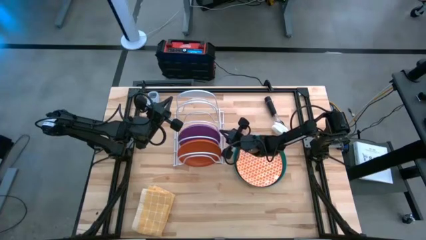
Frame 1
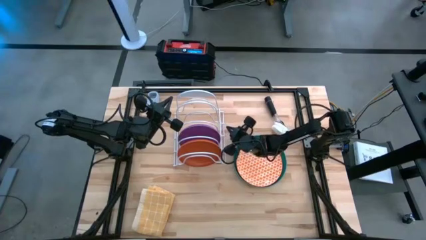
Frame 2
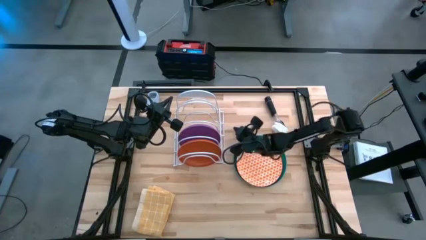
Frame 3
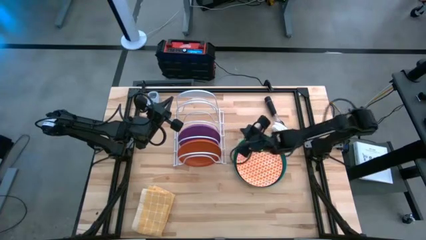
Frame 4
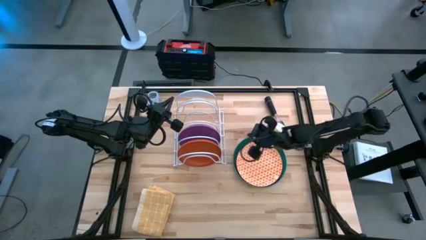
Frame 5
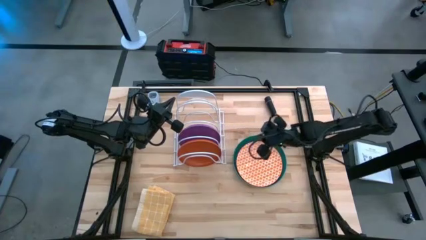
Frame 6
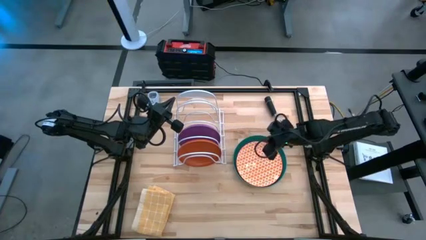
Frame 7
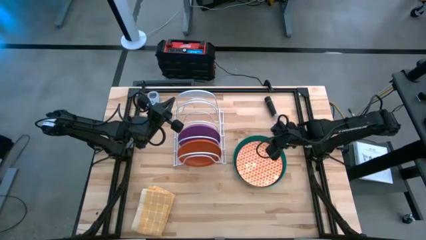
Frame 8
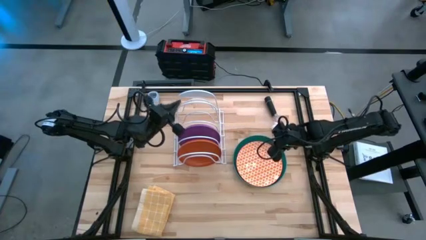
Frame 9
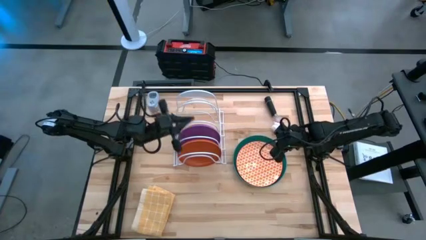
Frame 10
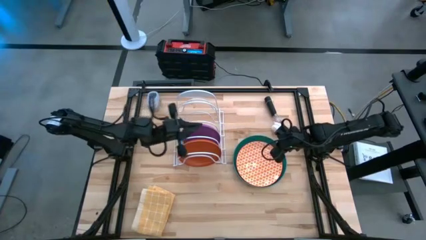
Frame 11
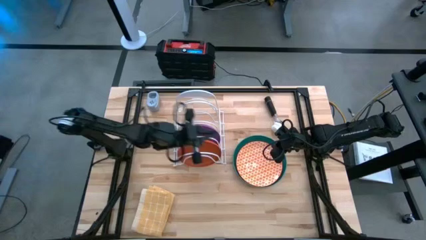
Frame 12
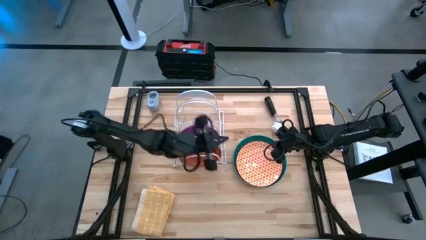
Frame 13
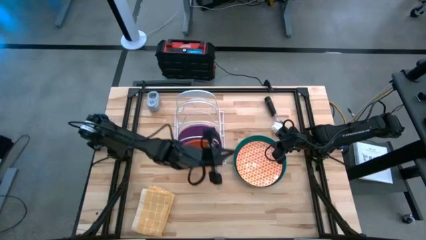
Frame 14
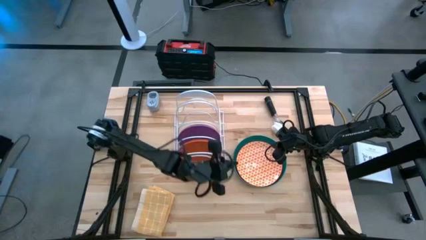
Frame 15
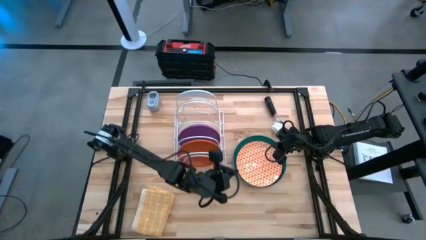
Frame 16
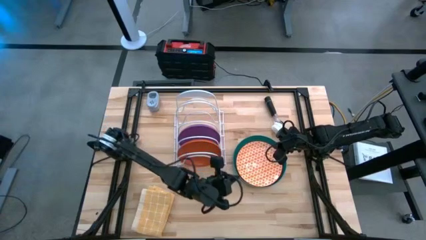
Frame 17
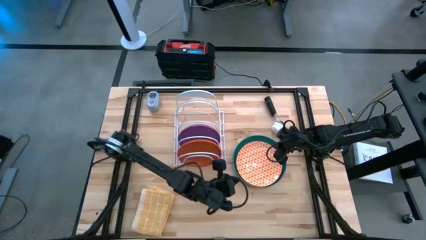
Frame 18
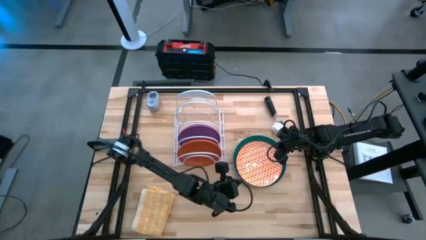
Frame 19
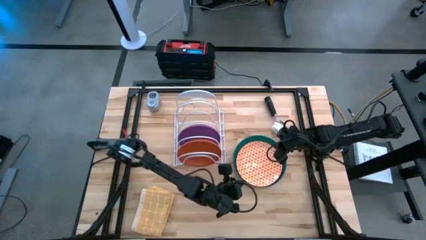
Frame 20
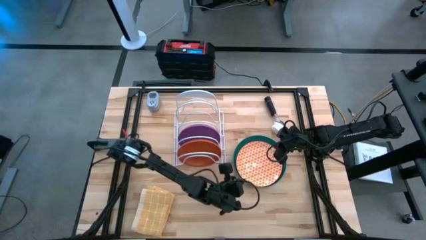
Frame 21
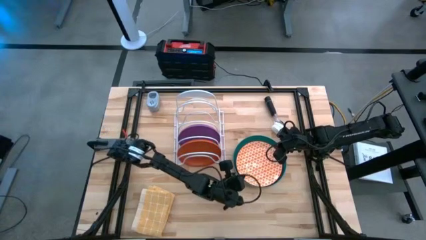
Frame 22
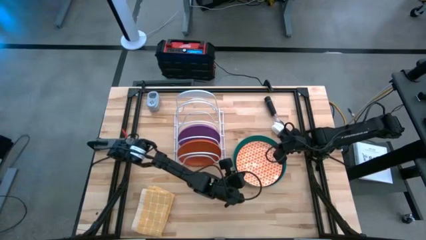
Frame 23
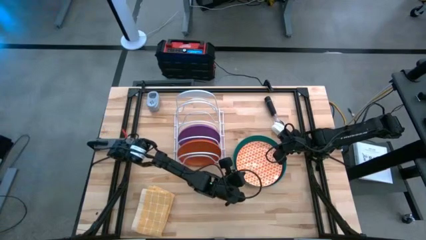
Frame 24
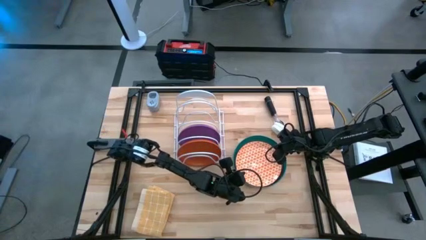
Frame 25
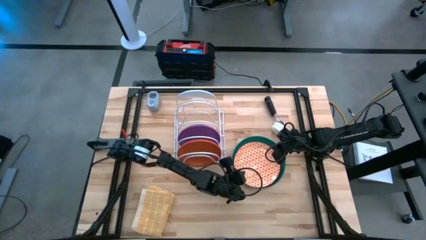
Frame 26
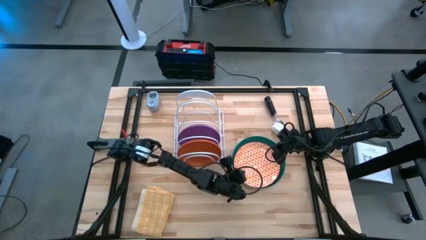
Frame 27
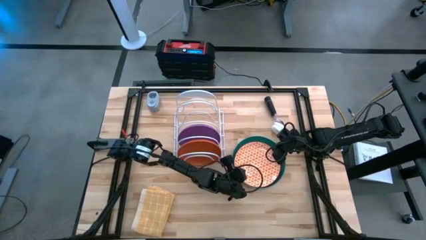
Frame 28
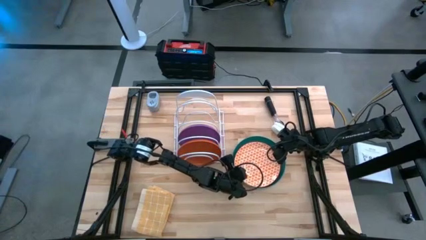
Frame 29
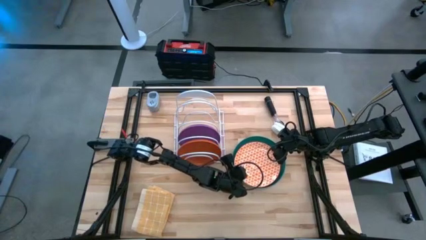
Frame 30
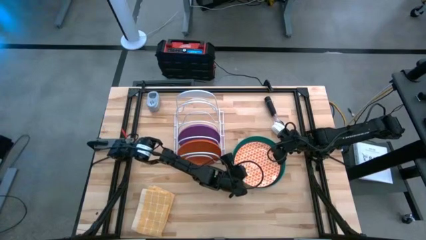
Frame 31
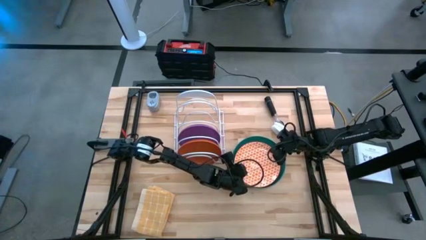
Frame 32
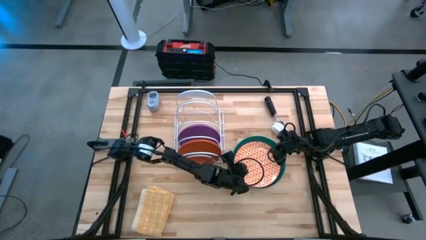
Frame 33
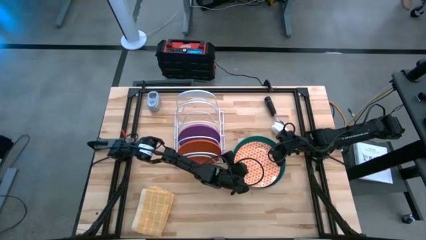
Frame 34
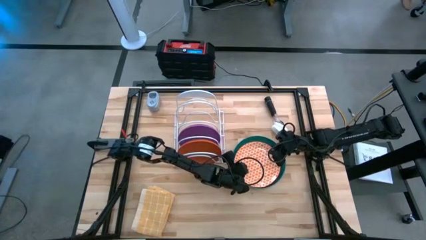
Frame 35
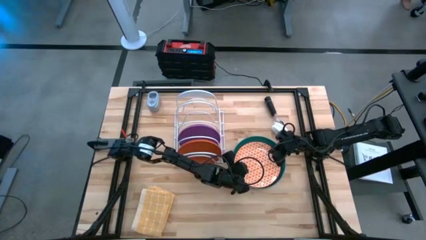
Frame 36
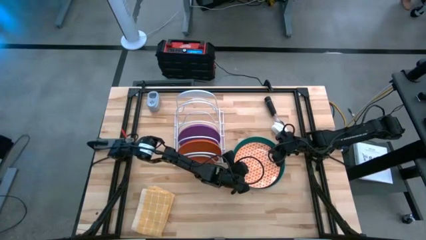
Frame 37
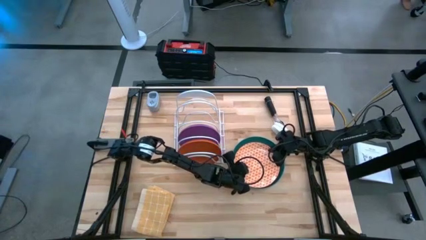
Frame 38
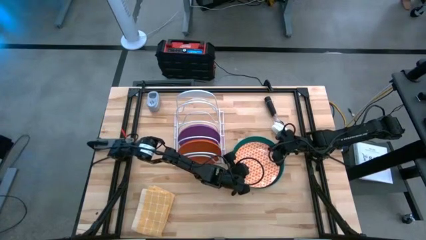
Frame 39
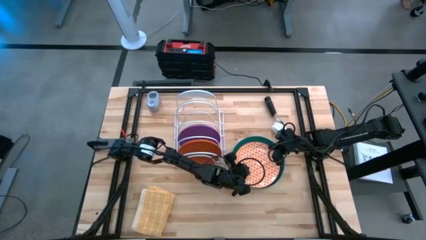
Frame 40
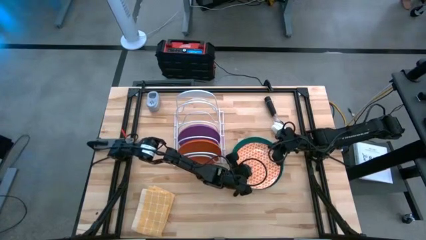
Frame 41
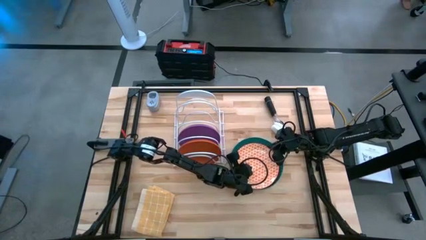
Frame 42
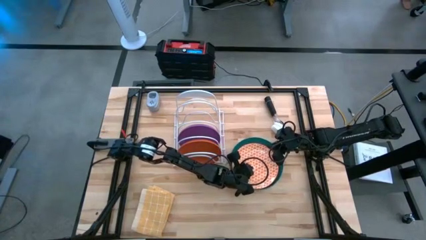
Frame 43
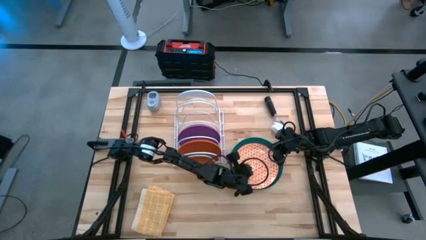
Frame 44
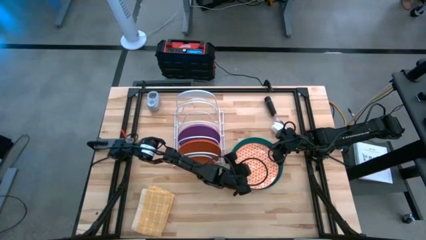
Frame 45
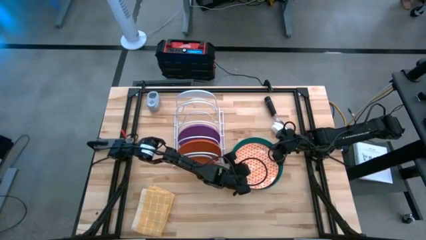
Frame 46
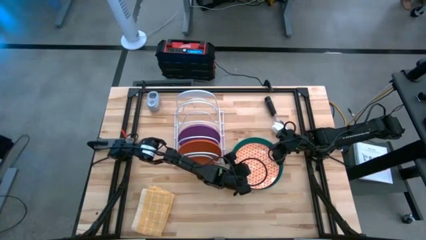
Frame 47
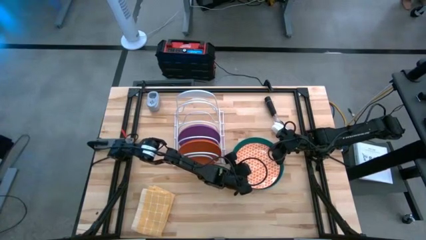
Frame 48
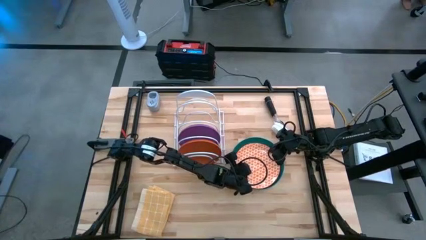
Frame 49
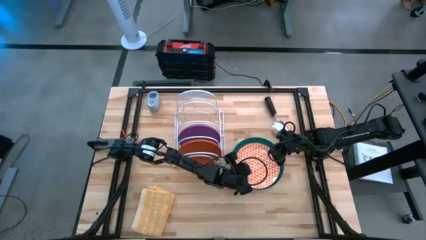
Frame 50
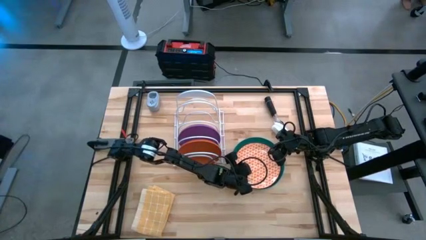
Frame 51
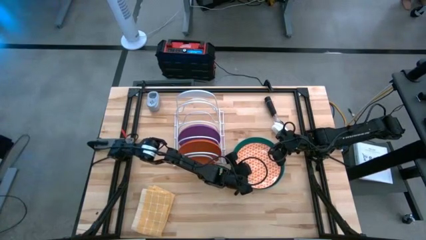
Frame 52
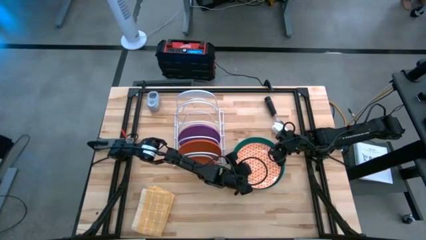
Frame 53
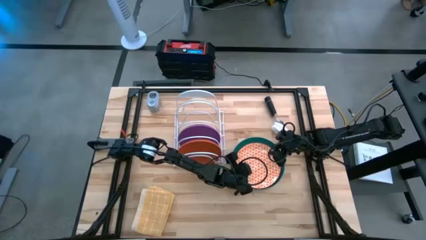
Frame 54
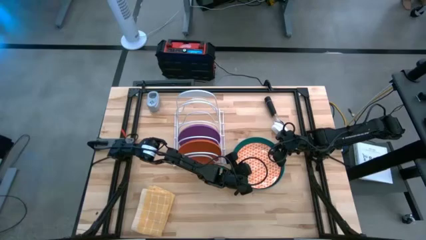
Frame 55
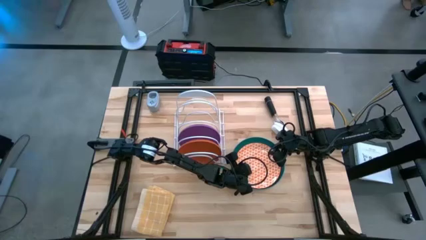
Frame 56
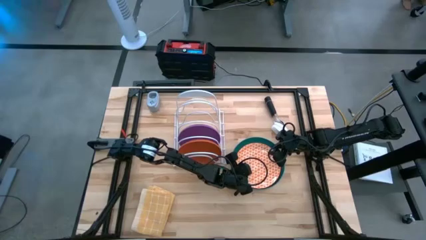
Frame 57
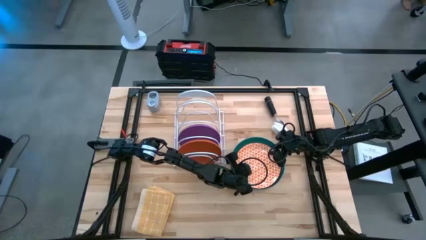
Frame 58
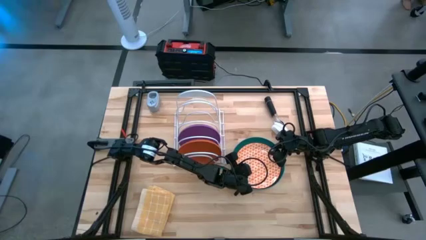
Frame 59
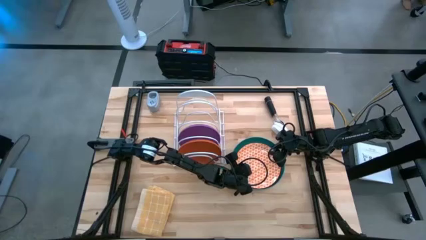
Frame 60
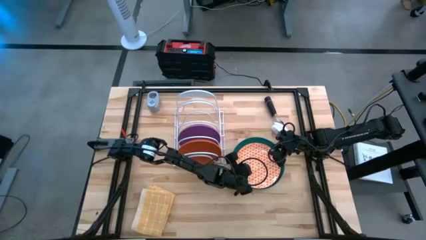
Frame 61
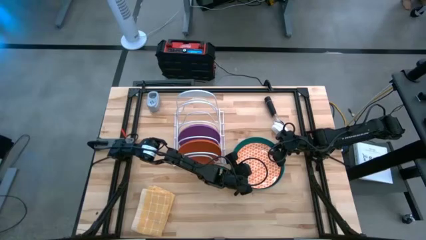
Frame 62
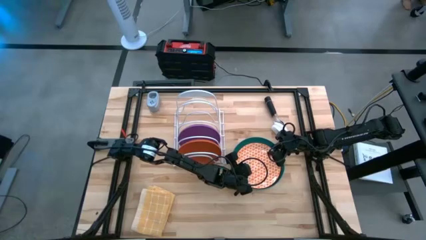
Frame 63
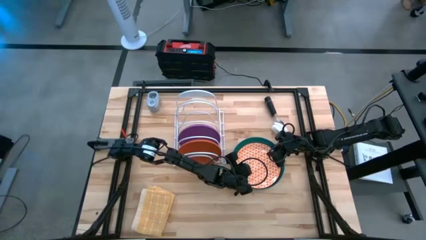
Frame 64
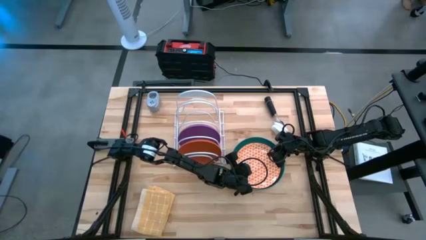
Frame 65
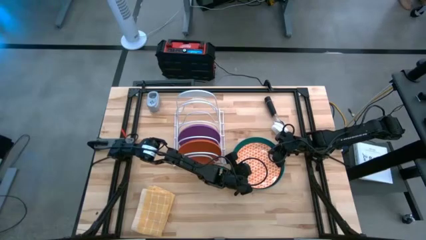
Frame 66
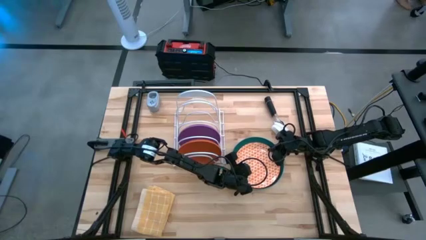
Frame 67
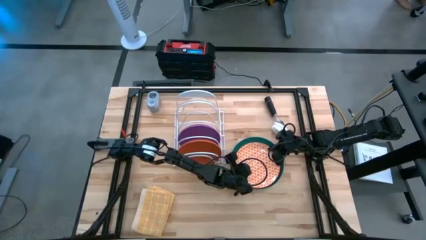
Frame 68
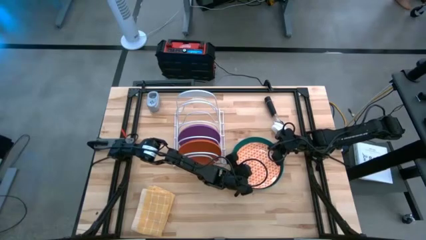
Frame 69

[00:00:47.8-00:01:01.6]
Task: Sort dishes
Put the orange/white plate into the dish rack
